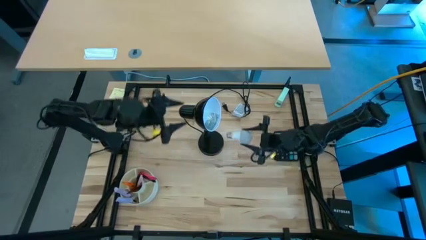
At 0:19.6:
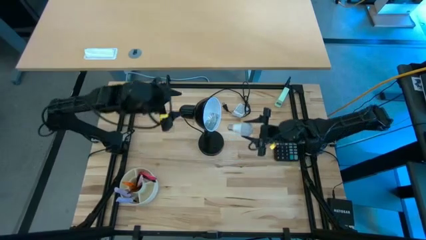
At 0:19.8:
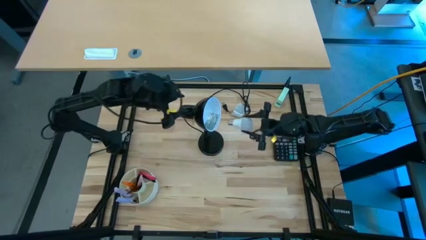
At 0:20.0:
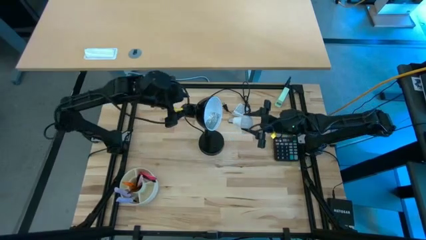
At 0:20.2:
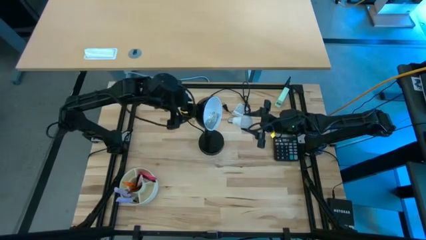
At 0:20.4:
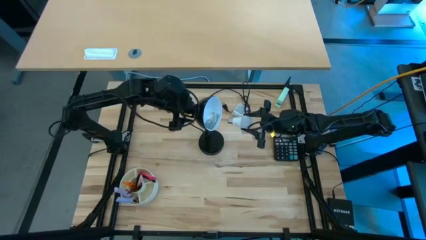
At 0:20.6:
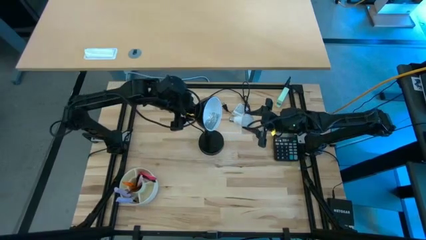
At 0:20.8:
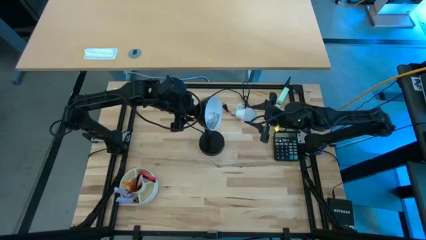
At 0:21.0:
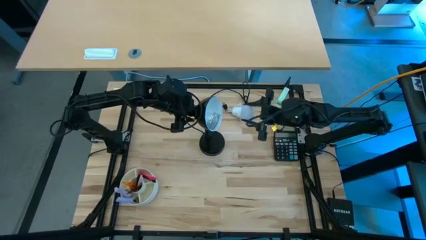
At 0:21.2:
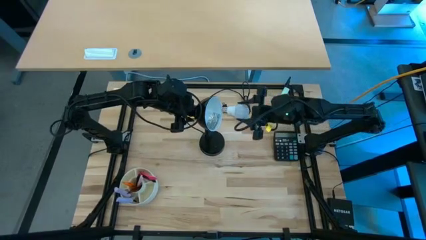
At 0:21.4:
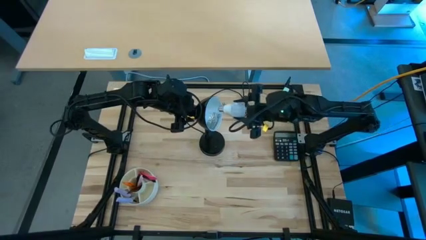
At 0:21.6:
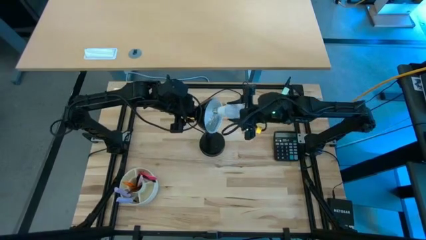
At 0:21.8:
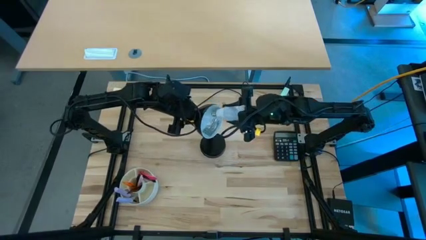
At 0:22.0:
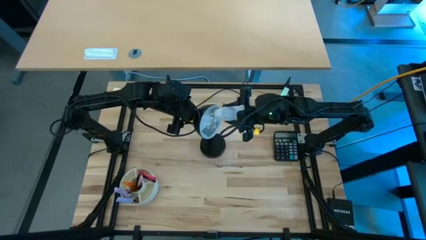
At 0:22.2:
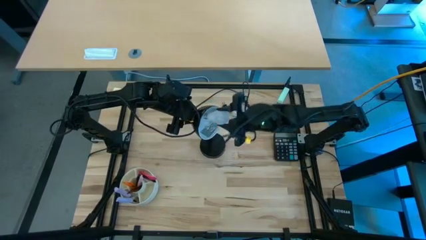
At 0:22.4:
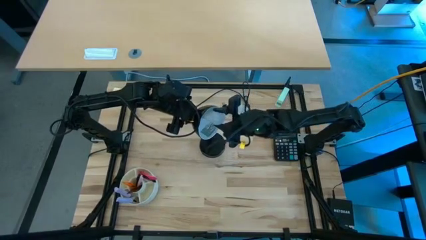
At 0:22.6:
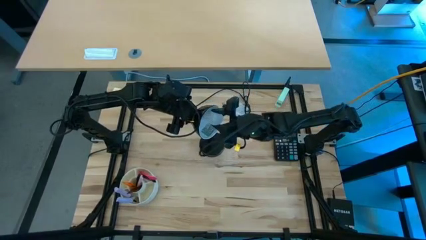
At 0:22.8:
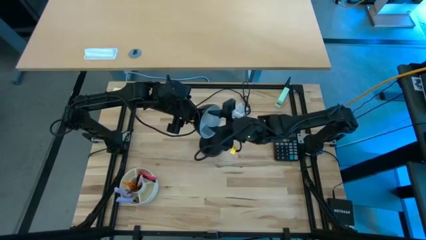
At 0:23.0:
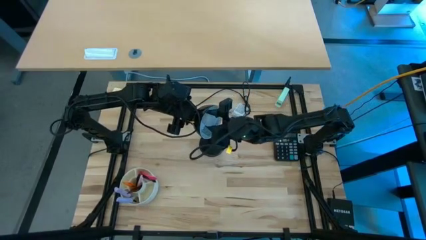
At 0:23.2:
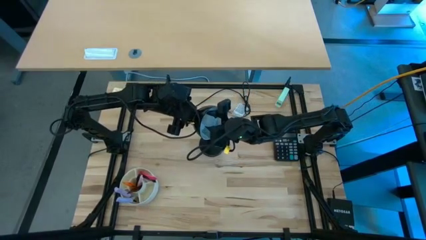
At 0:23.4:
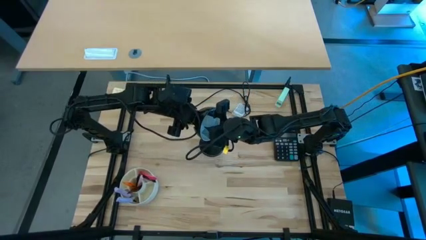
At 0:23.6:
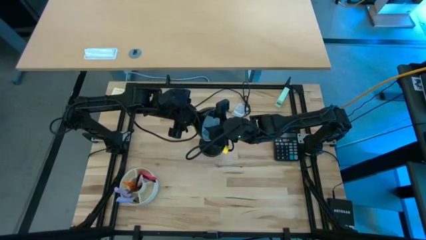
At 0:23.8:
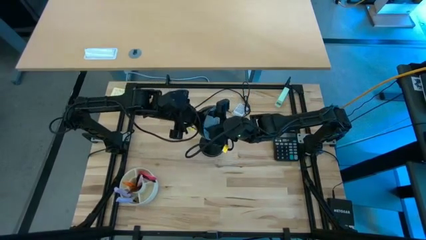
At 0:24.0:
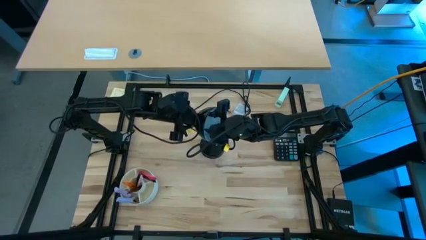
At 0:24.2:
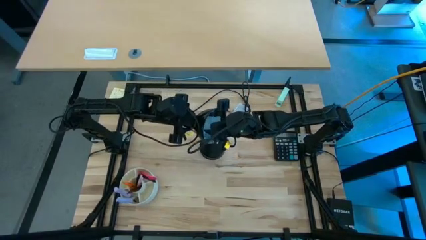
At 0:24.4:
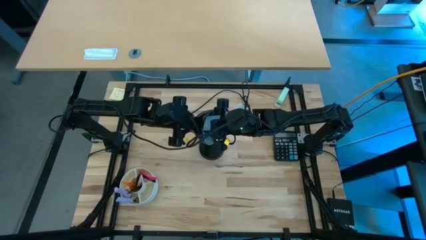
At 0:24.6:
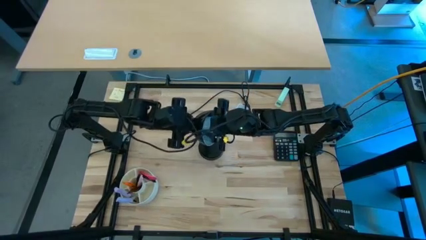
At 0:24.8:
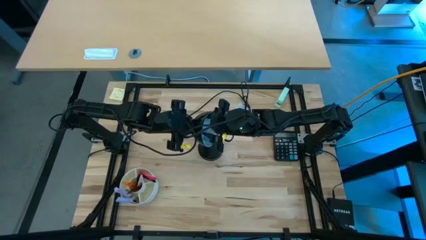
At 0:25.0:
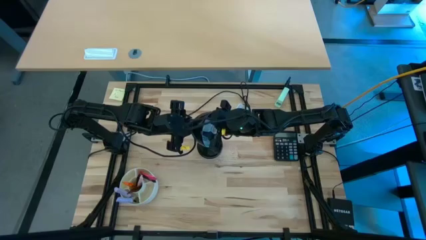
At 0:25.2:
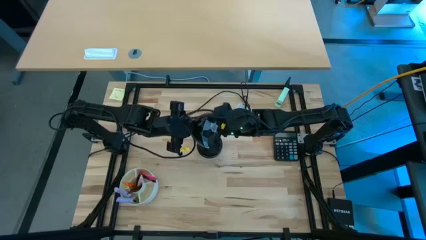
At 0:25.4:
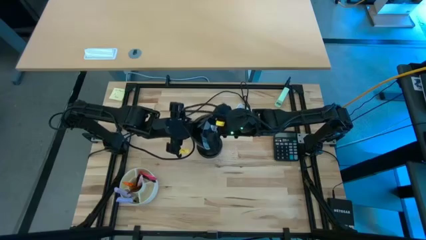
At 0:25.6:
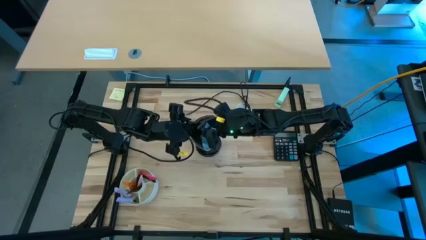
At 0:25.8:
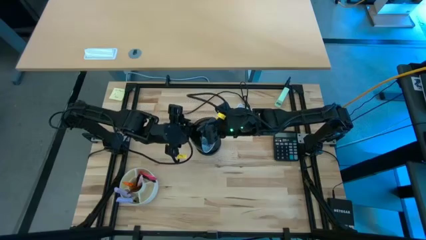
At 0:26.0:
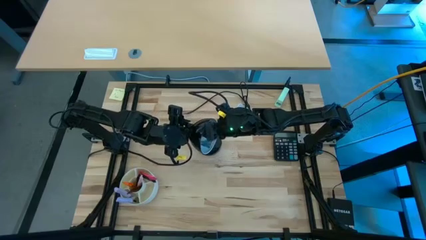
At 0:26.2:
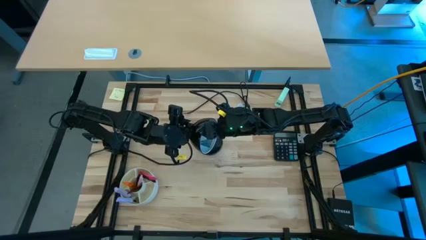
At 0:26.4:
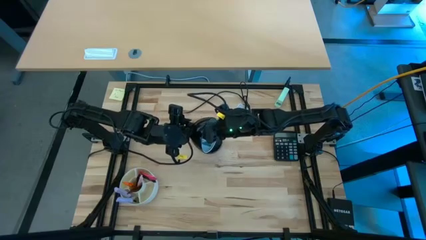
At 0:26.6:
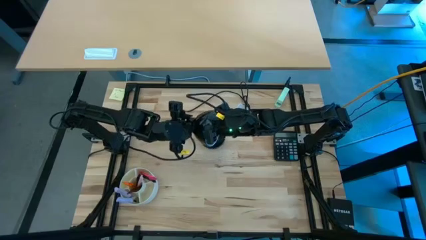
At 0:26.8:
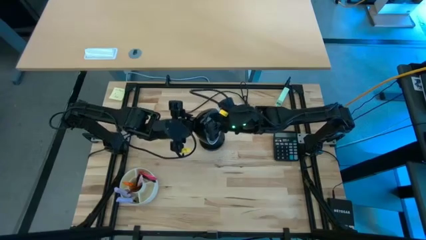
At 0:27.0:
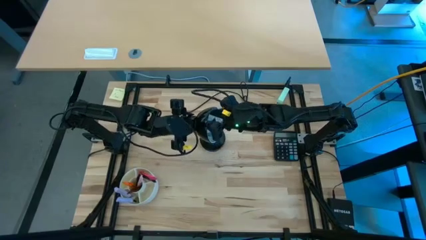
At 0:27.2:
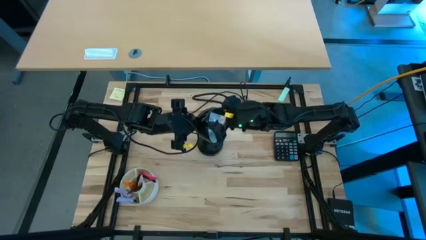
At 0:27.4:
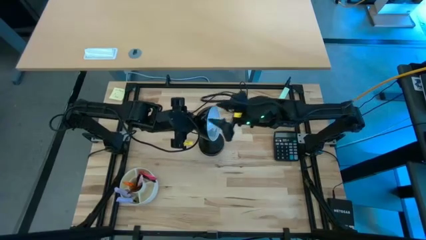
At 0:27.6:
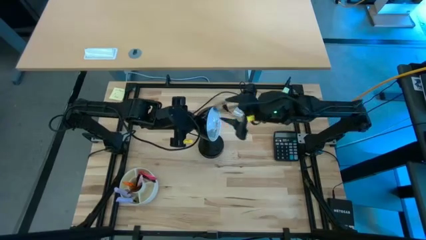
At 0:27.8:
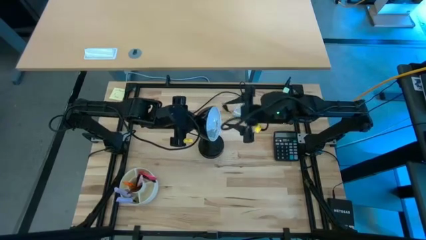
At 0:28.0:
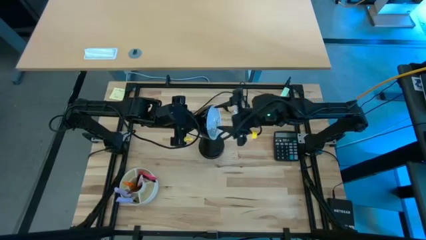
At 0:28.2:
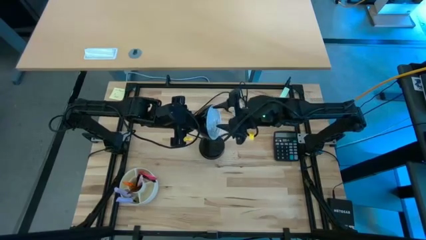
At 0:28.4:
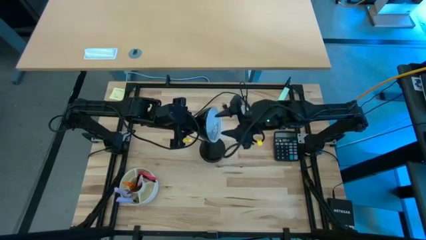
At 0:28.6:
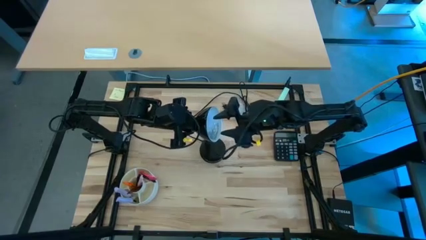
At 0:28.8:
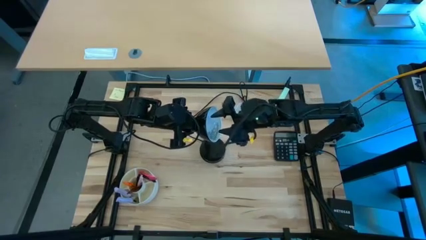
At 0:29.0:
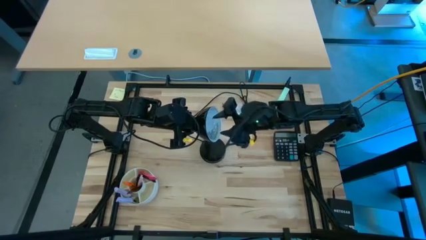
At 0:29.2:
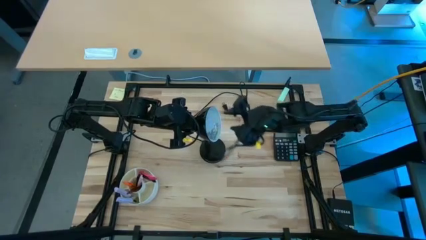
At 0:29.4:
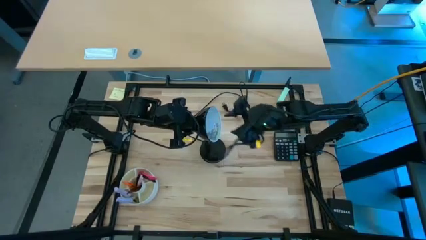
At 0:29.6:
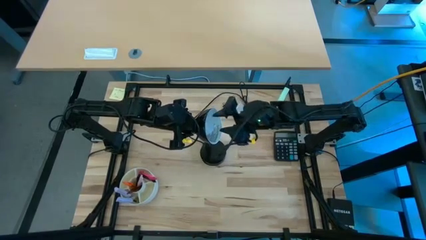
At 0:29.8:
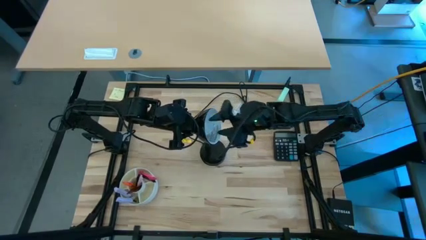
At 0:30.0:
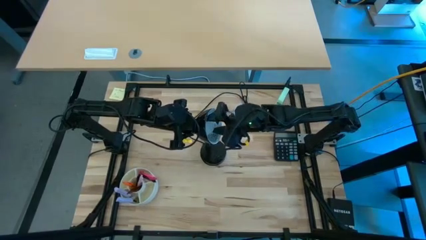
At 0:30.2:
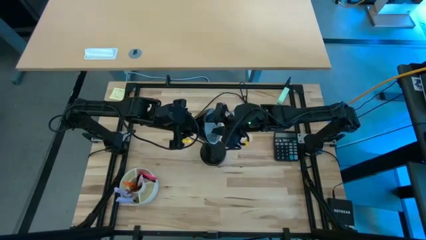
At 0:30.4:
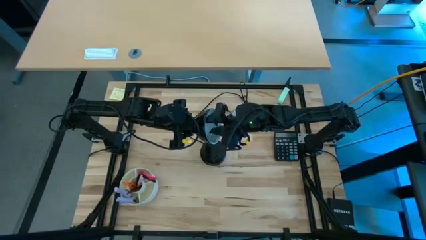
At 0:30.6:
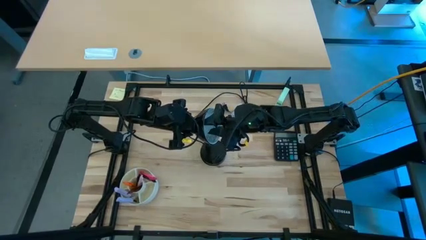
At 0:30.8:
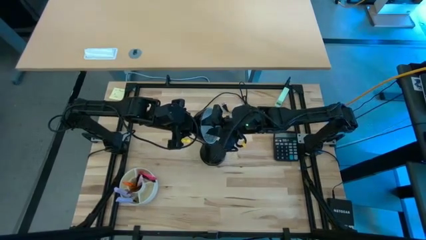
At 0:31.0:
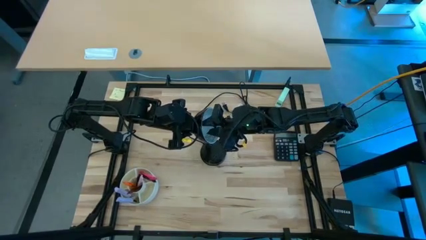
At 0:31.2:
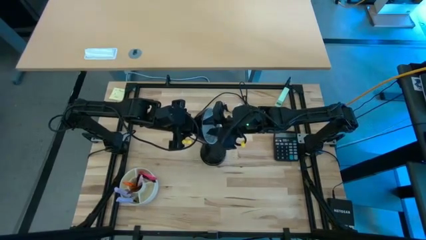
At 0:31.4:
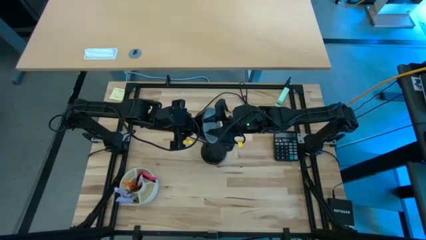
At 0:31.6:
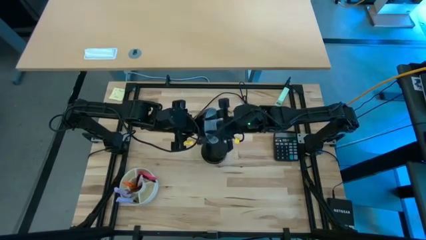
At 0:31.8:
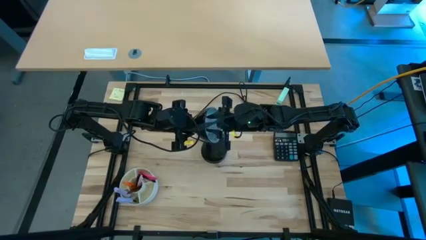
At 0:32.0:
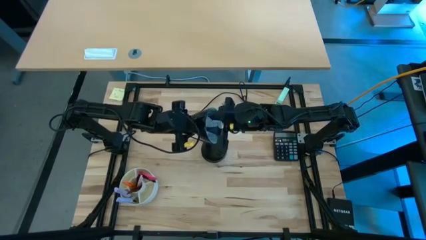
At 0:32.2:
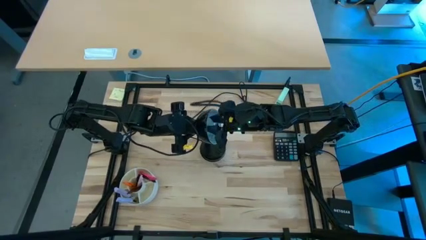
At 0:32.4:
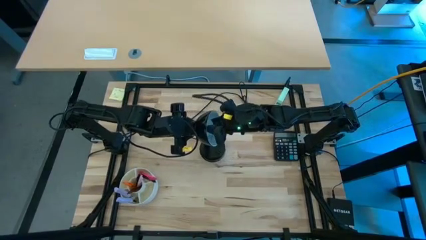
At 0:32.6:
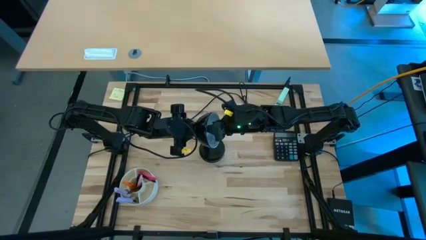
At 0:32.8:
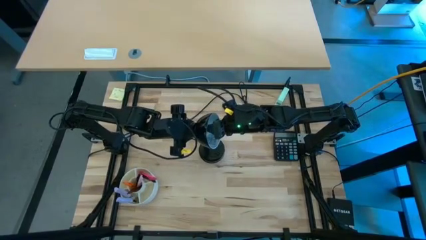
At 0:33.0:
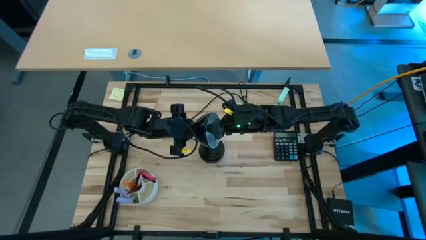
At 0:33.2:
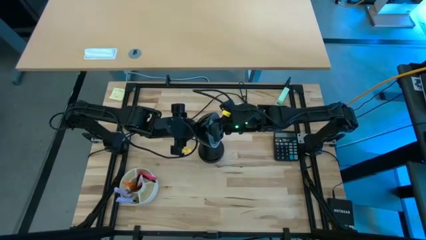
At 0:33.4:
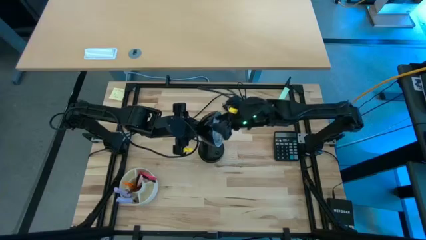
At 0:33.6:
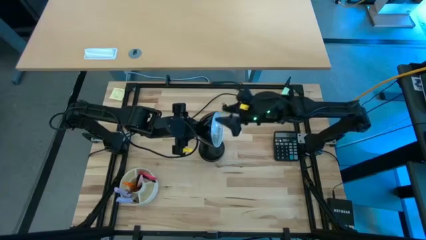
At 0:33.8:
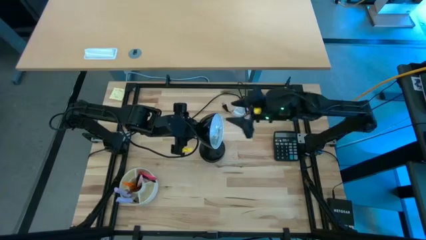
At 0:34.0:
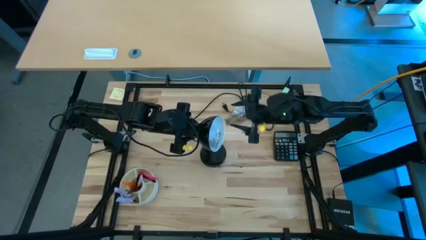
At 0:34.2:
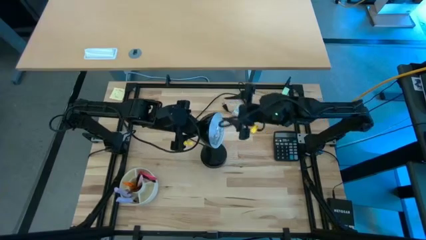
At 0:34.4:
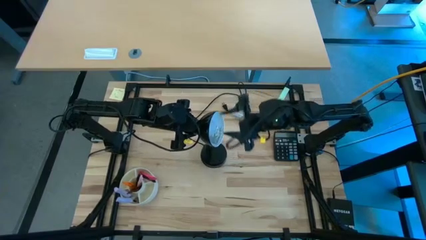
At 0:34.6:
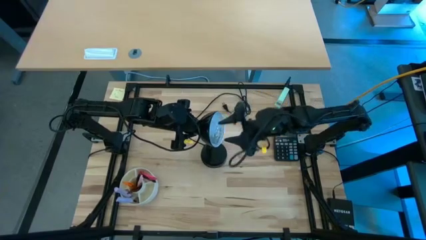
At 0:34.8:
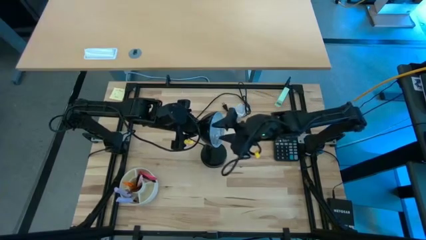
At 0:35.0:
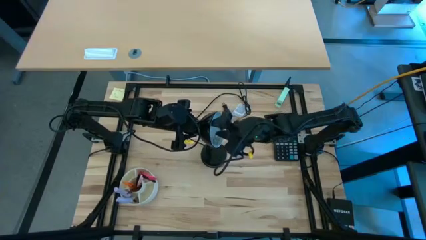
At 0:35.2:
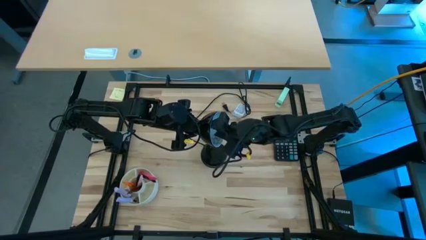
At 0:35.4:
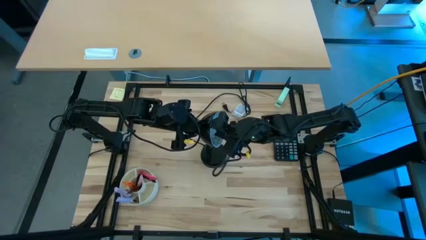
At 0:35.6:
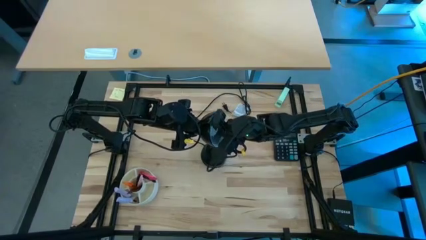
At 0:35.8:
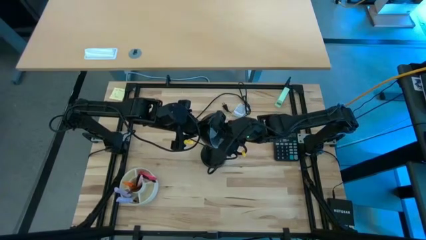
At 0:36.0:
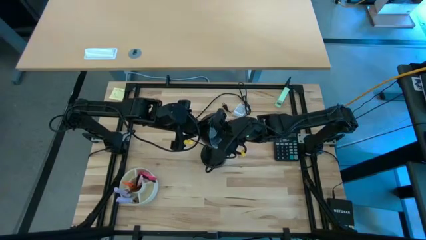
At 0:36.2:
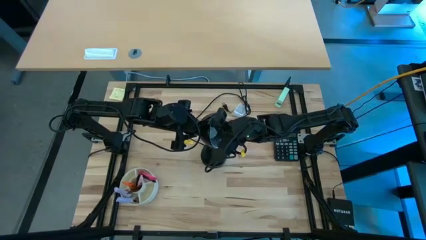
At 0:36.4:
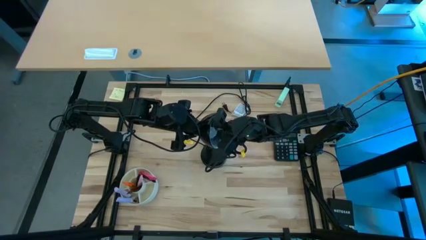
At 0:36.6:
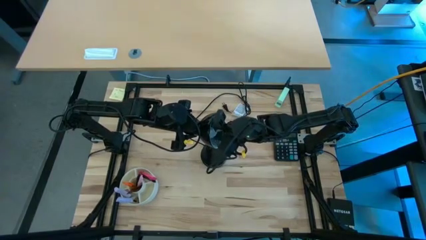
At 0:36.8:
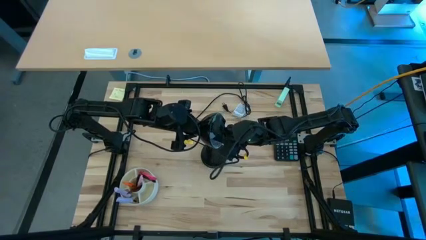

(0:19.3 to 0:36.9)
Task: Screw lightbulb
Insert the white lightbulb into the black desk lamp
